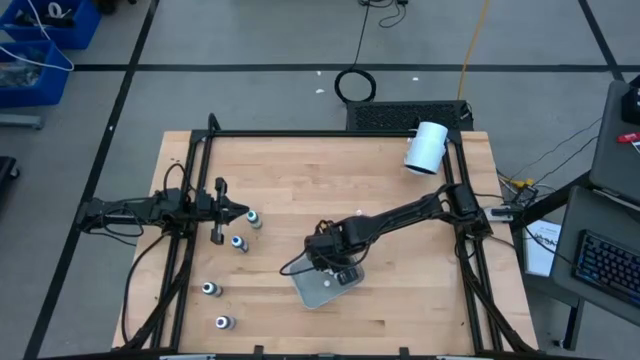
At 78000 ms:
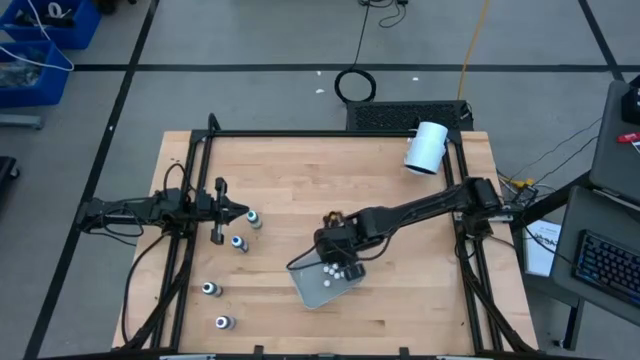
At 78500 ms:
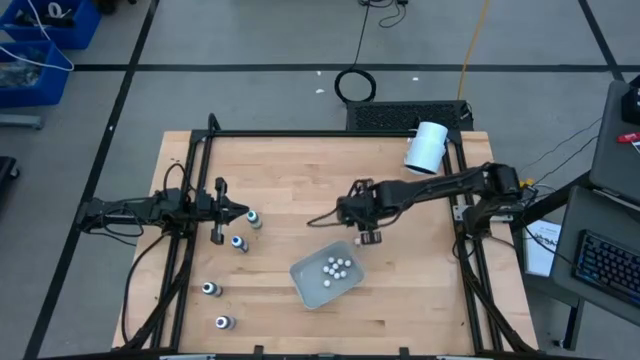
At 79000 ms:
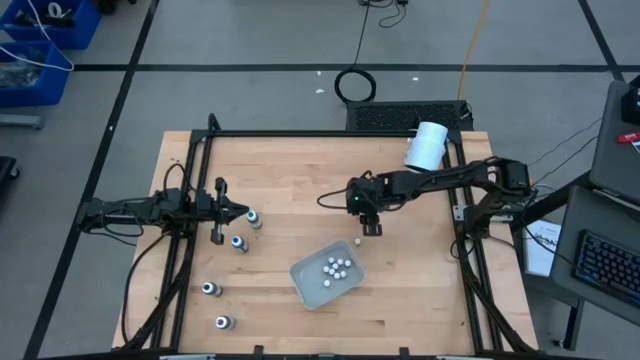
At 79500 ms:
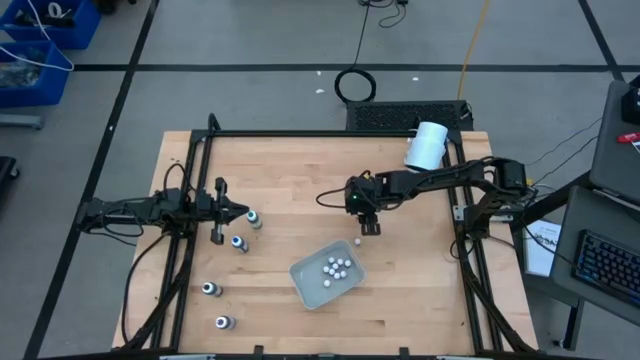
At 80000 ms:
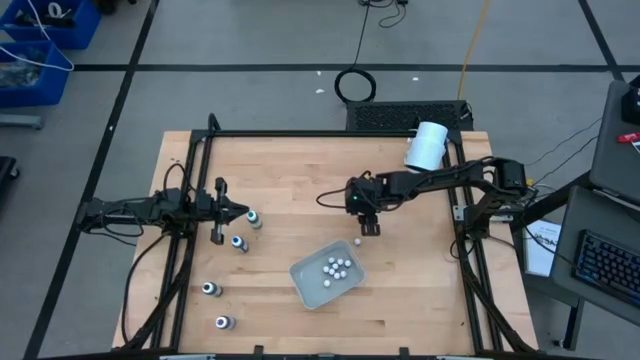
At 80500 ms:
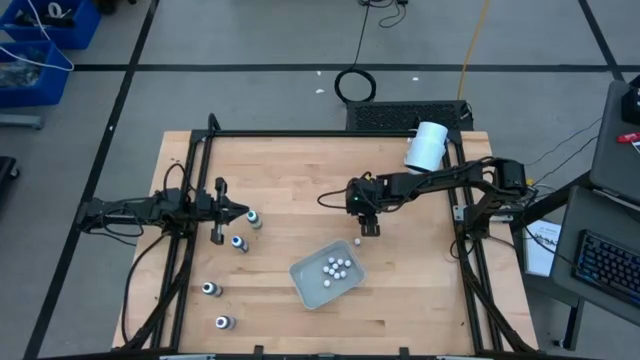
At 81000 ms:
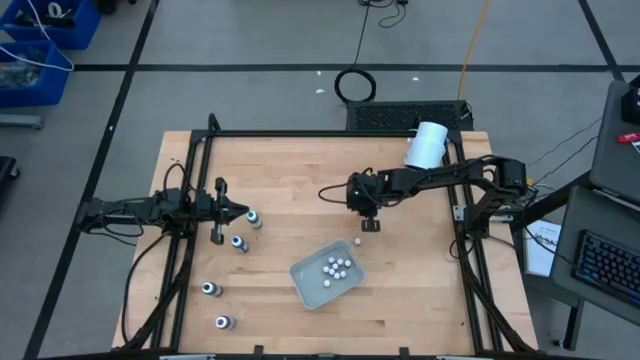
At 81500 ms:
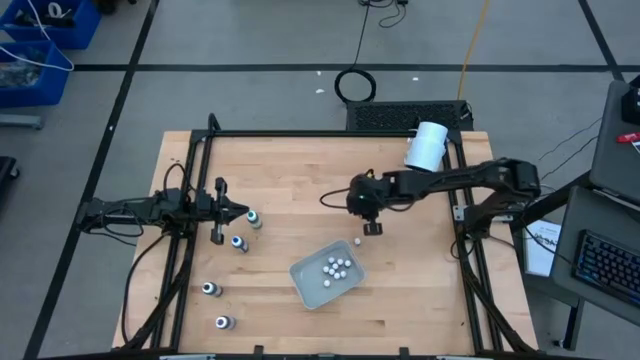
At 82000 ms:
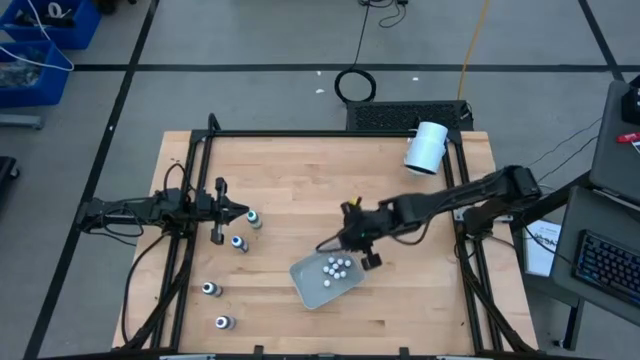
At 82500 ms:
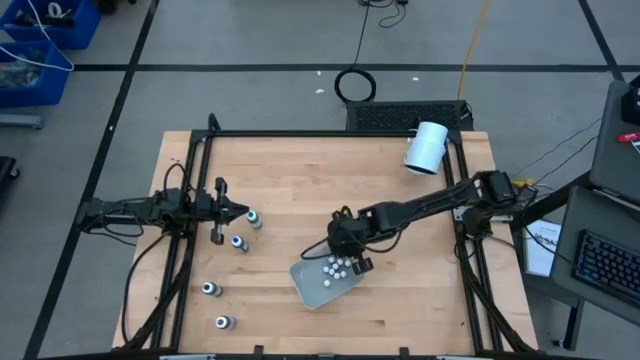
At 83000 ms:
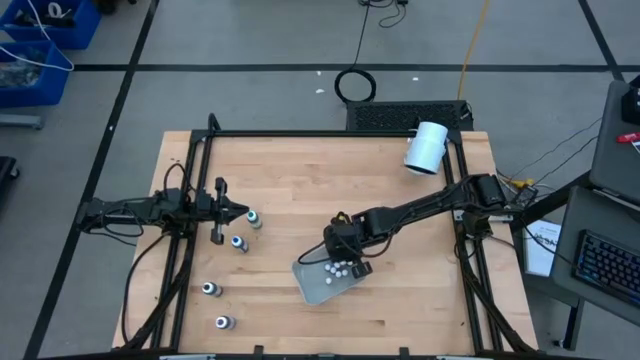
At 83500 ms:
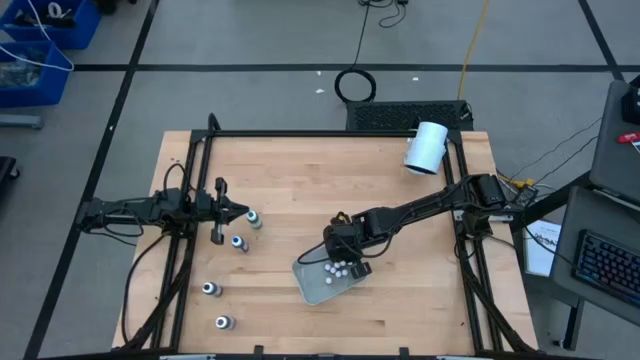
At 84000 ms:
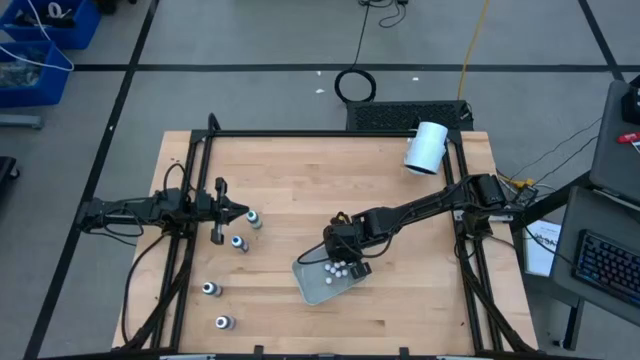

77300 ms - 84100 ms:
Task: Pick & Place food coloring
Put the small orange food coloring bottle in the gray bin

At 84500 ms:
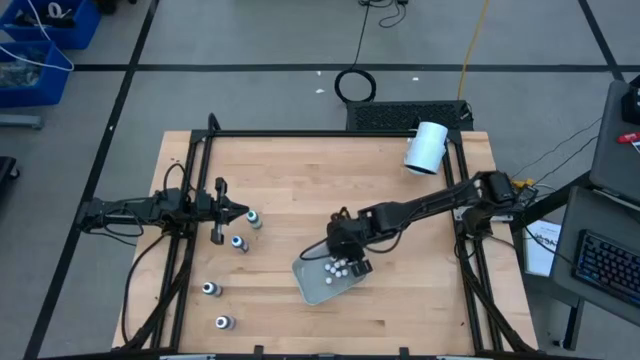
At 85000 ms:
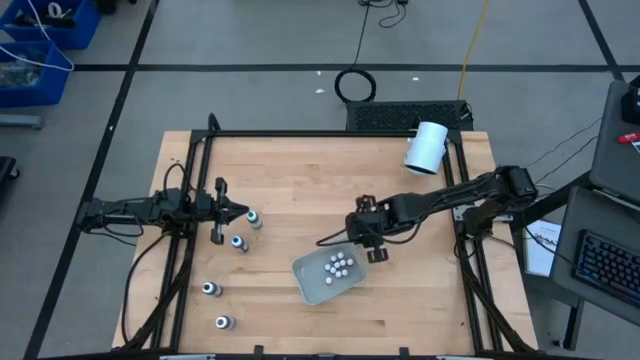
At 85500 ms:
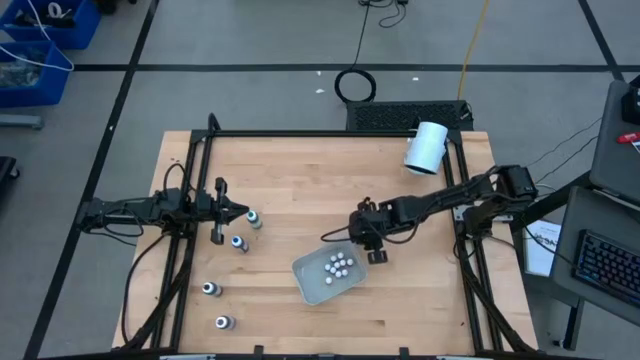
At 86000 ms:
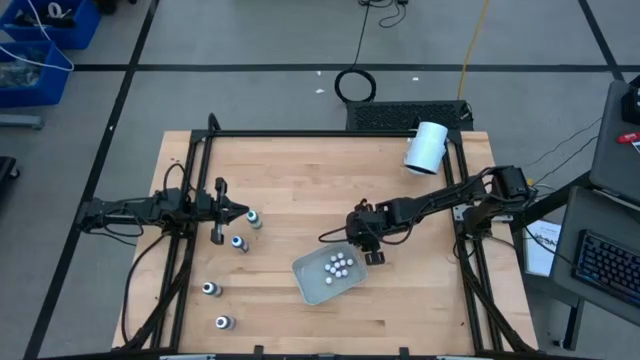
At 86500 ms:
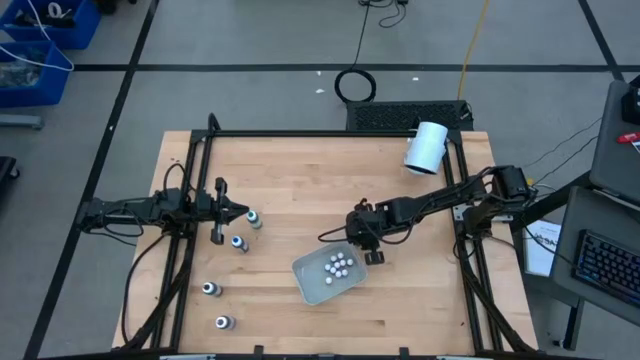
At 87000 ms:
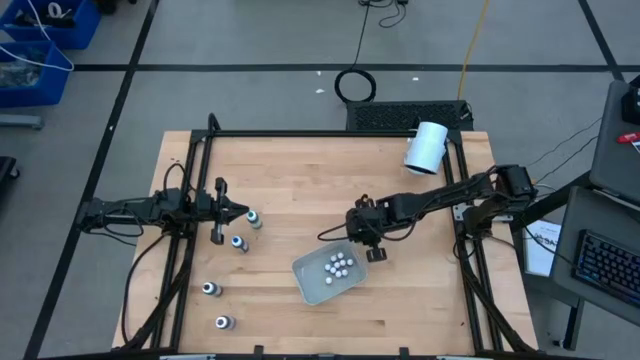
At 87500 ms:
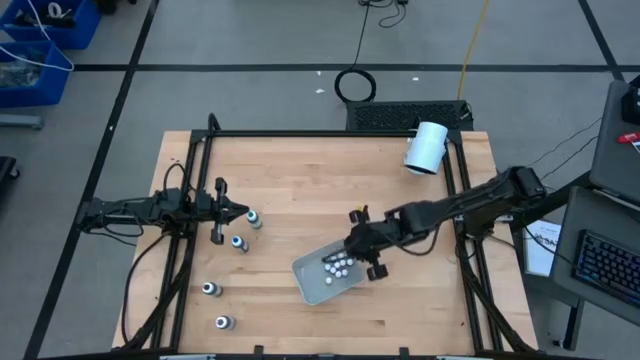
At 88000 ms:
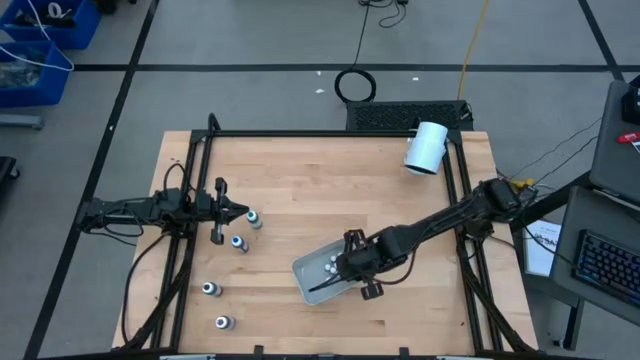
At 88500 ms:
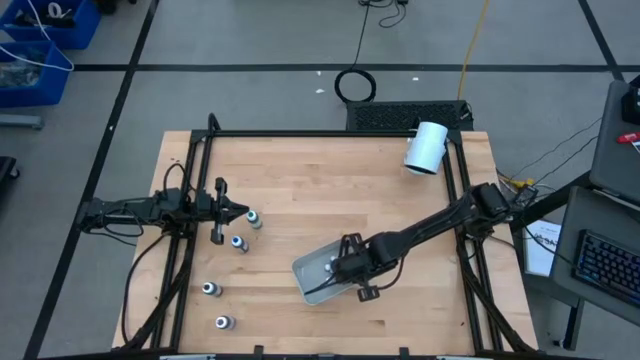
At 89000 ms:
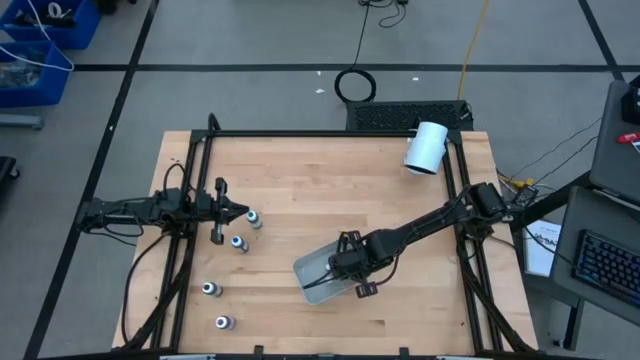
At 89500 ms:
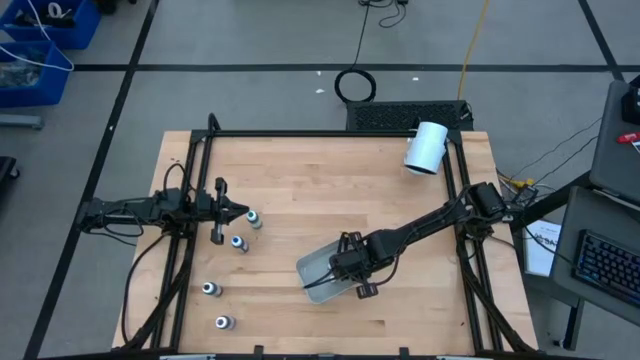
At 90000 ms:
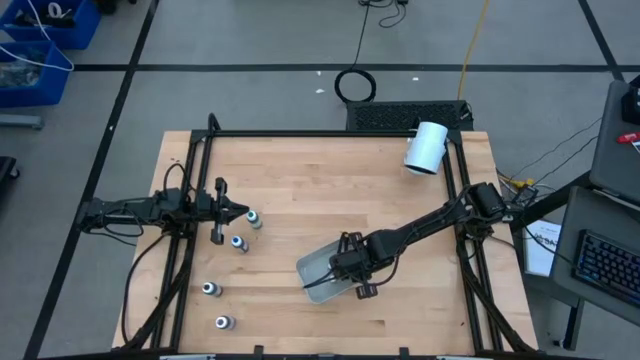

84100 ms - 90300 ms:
Put the small violet food coloring bottle in the gray bin

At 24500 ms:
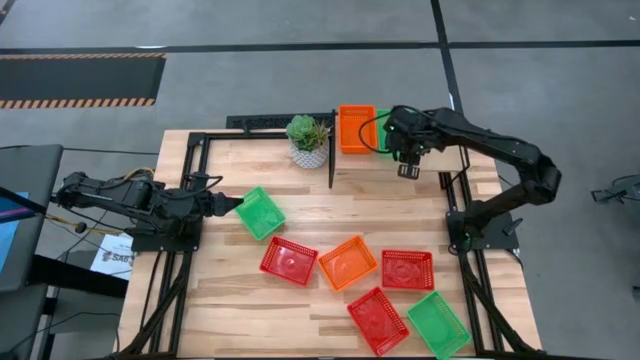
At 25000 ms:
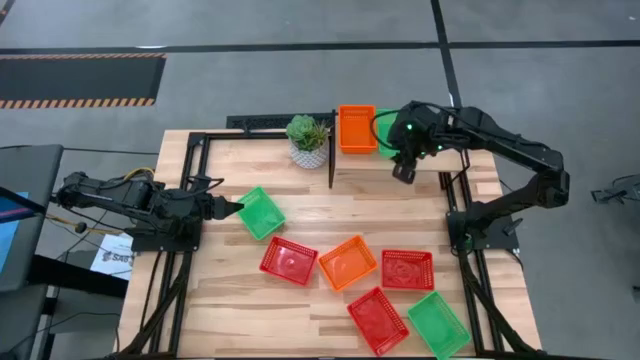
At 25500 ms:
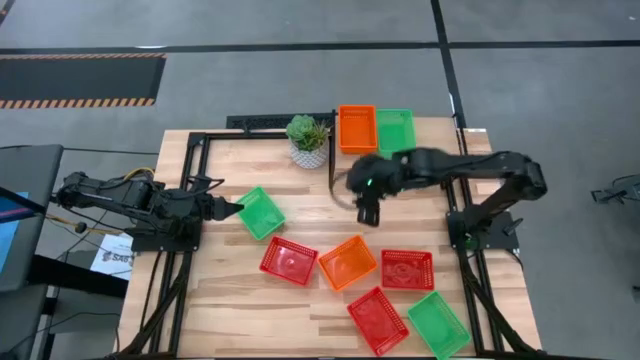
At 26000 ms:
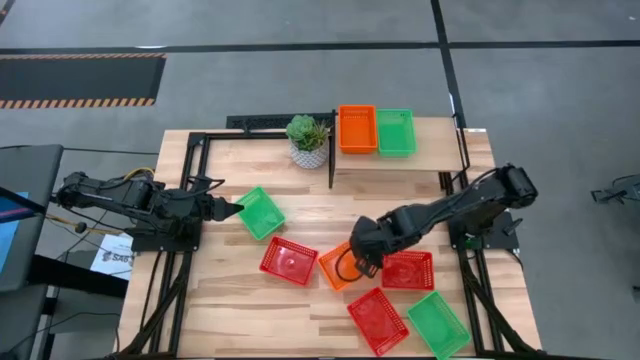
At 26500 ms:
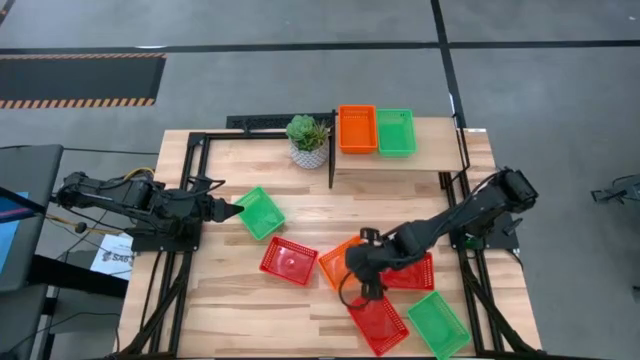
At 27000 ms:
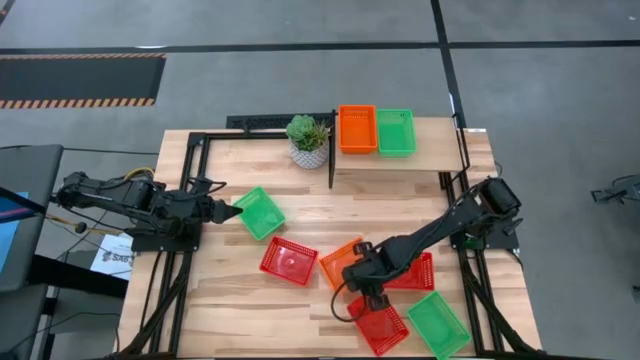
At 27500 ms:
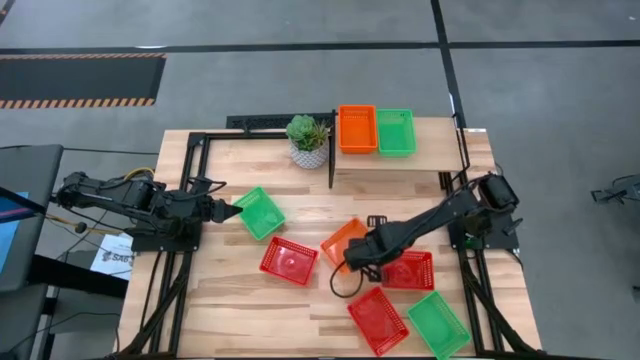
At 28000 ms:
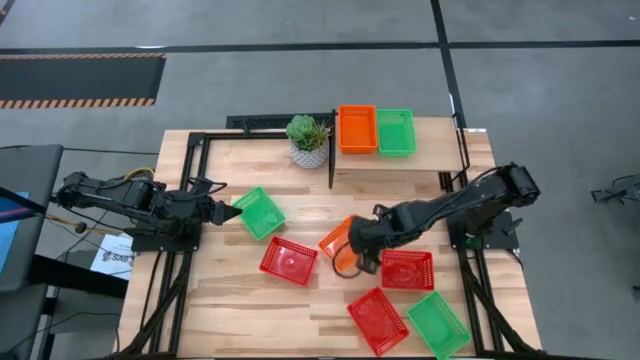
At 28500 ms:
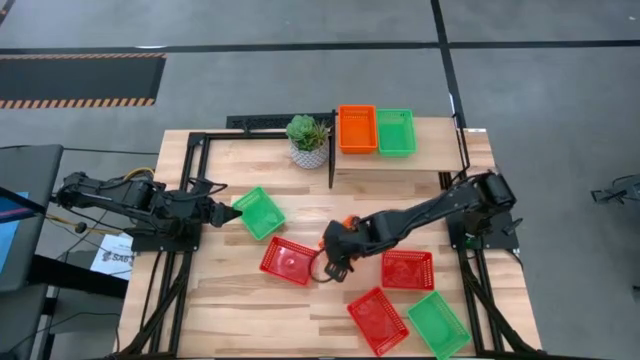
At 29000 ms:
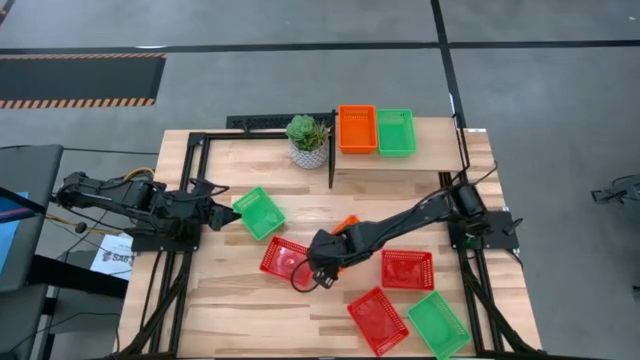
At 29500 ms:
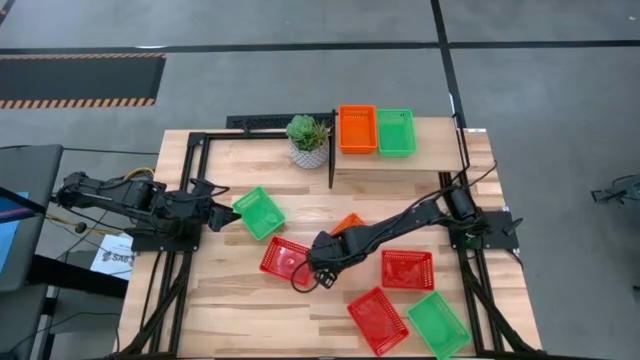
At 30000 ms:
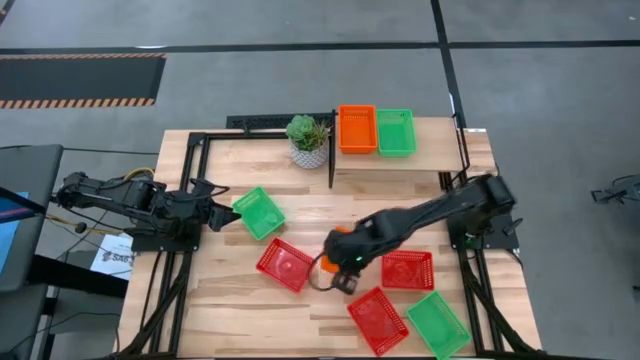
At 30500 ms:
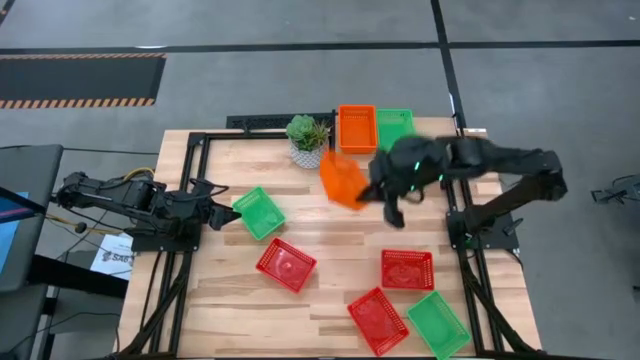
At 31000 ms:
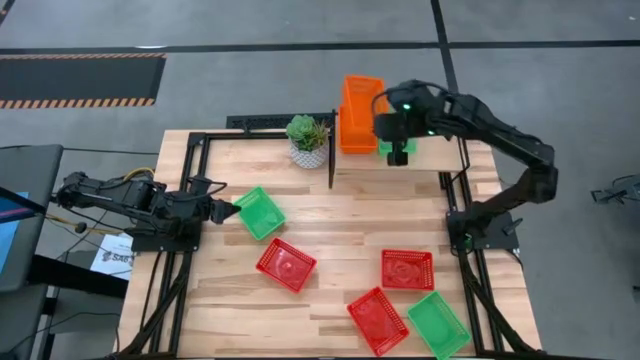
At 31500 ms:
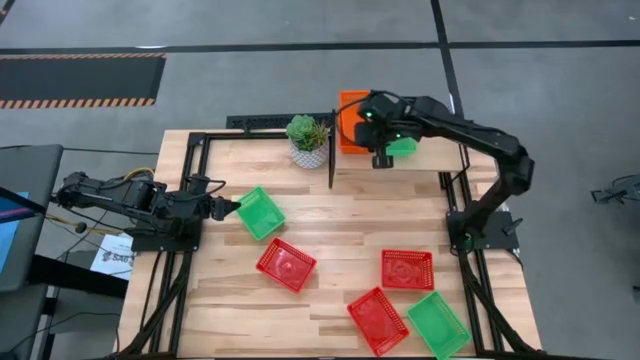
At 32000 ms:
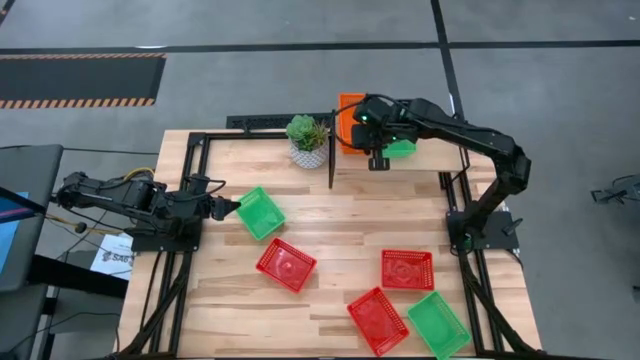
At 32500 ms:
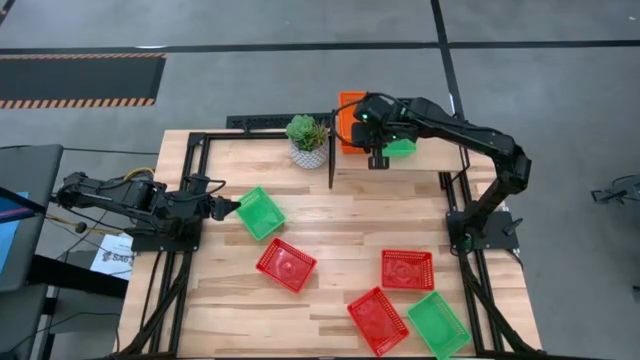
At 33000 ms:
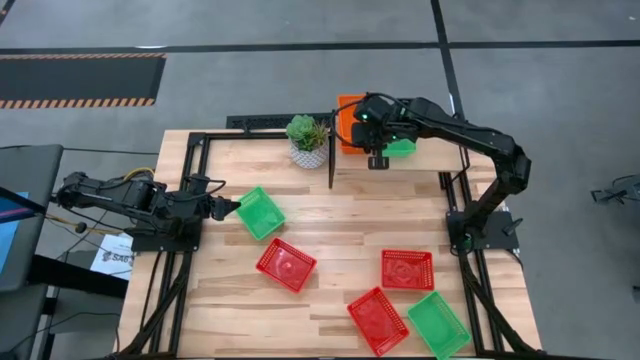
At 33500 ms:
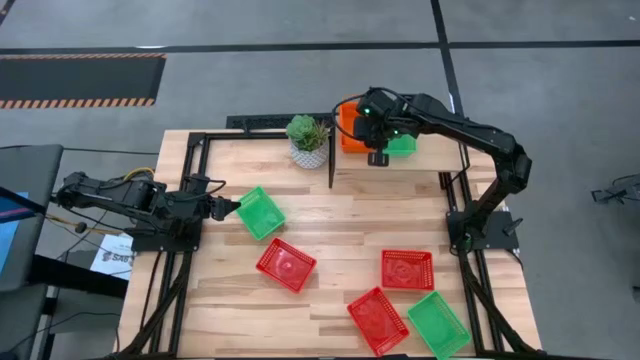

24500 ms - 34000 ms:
Task: Stack baskets on shelf by color
Stack the orange bin on the orange bin on the shelf
